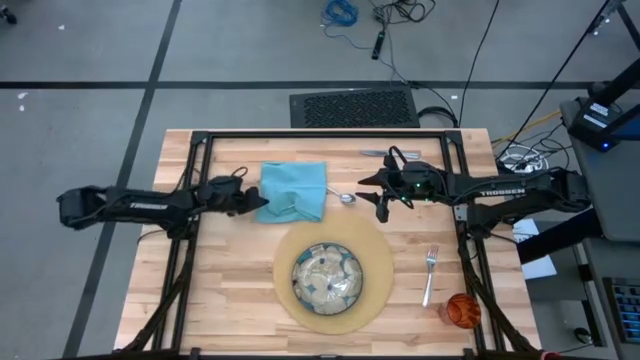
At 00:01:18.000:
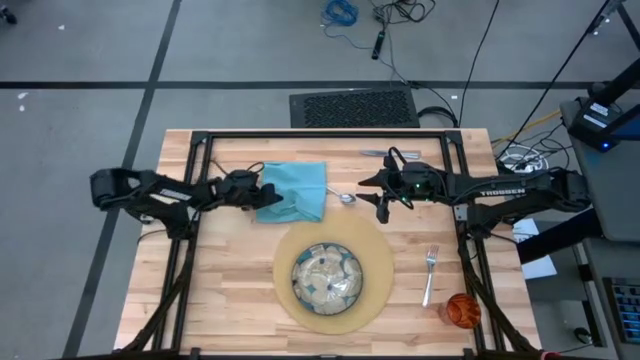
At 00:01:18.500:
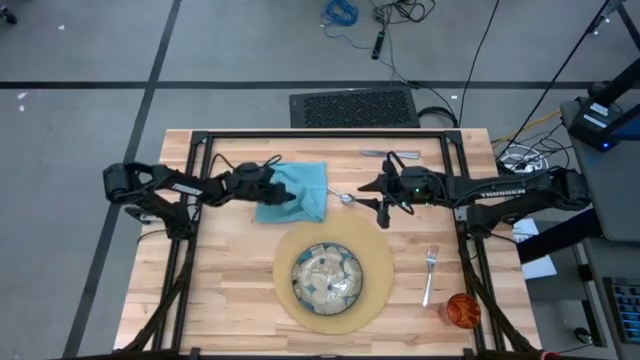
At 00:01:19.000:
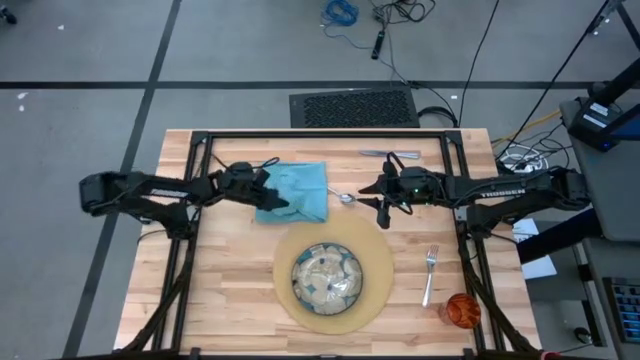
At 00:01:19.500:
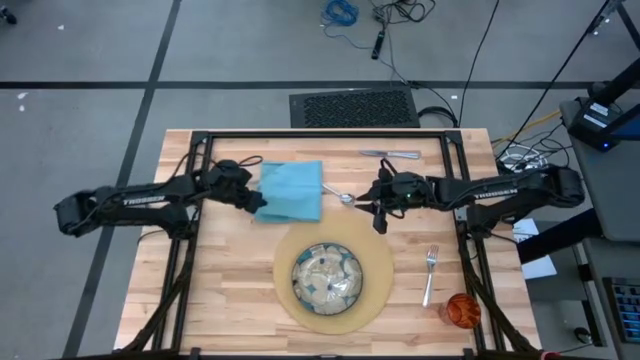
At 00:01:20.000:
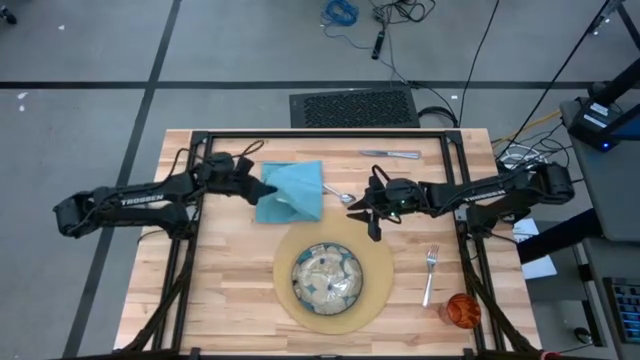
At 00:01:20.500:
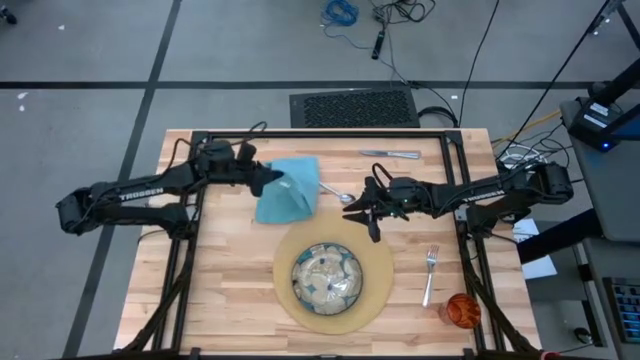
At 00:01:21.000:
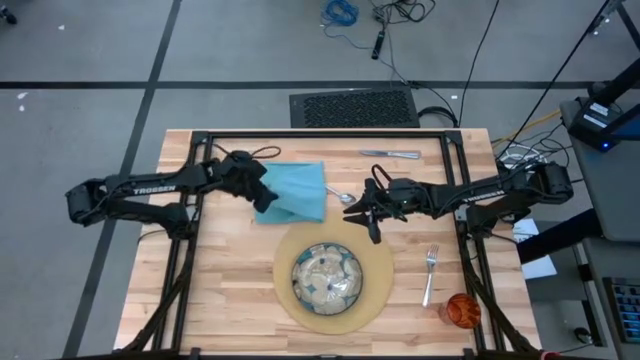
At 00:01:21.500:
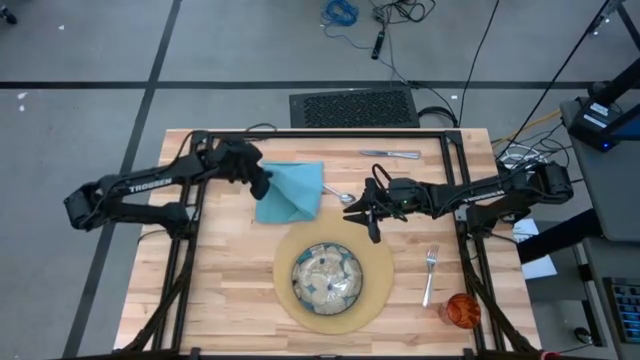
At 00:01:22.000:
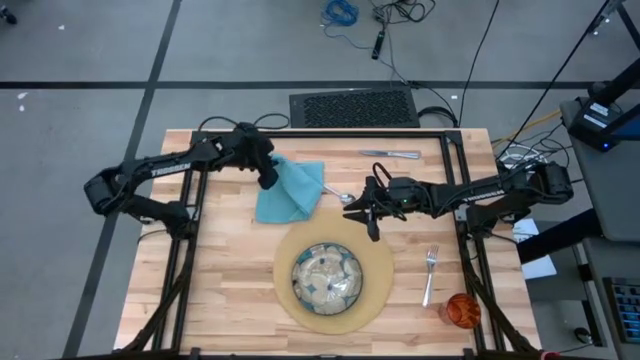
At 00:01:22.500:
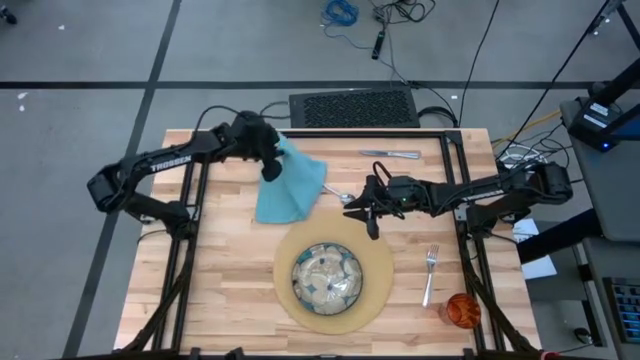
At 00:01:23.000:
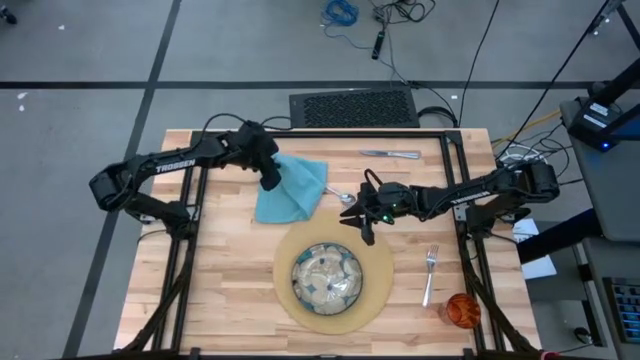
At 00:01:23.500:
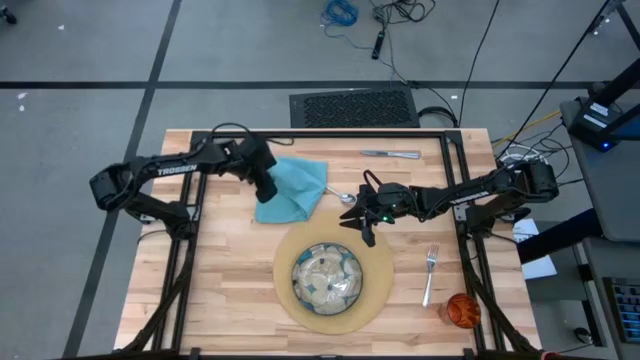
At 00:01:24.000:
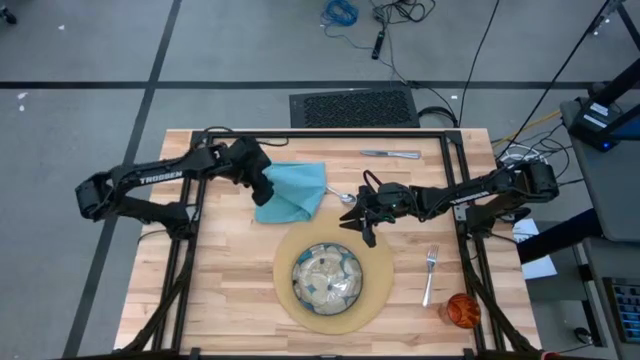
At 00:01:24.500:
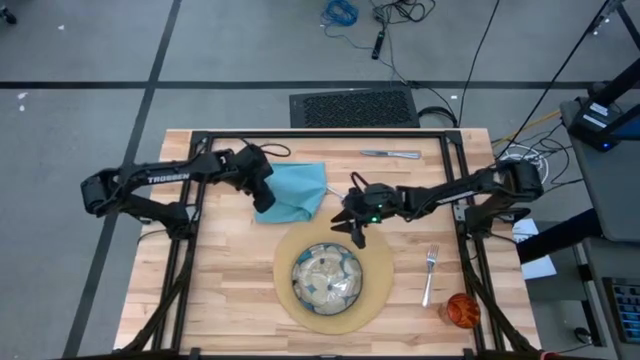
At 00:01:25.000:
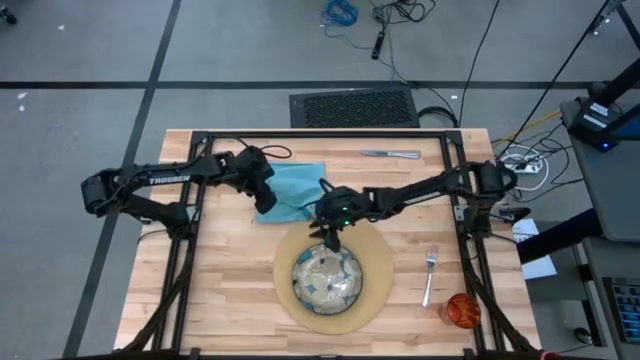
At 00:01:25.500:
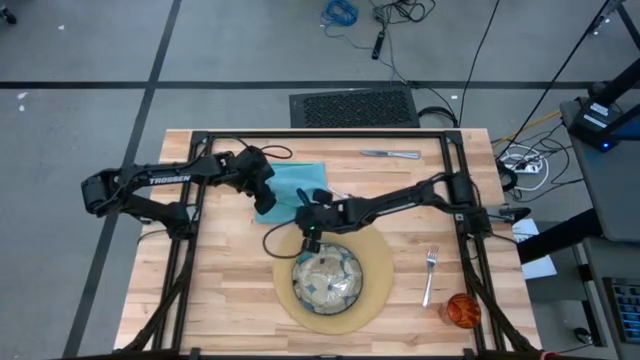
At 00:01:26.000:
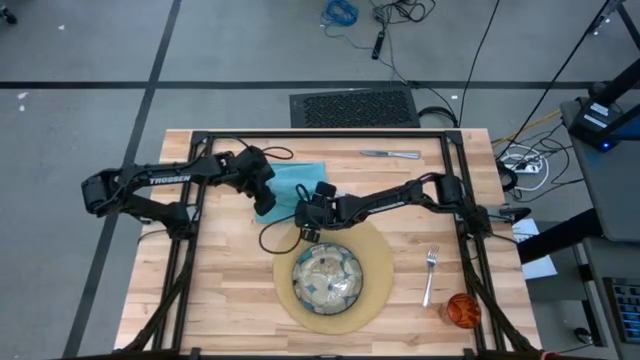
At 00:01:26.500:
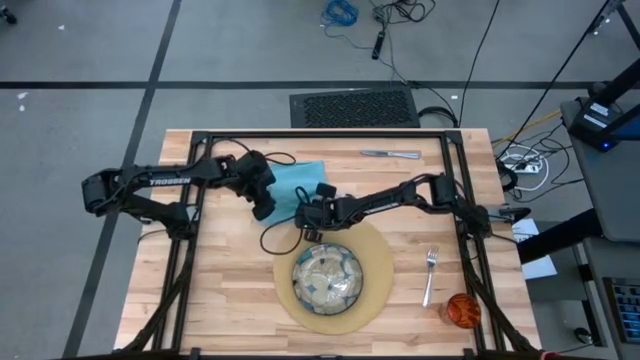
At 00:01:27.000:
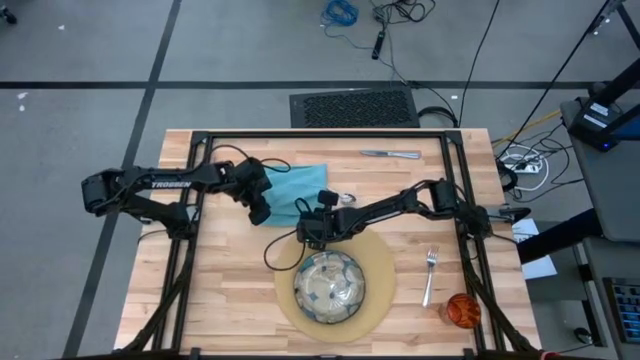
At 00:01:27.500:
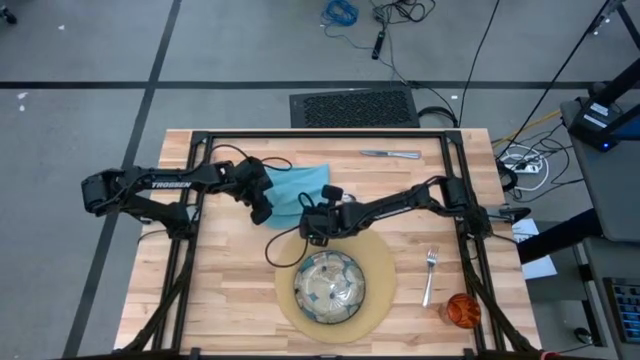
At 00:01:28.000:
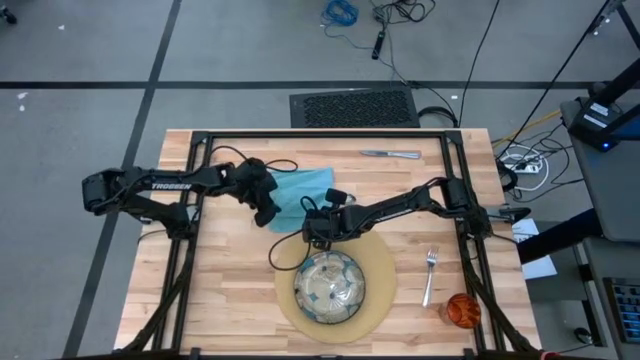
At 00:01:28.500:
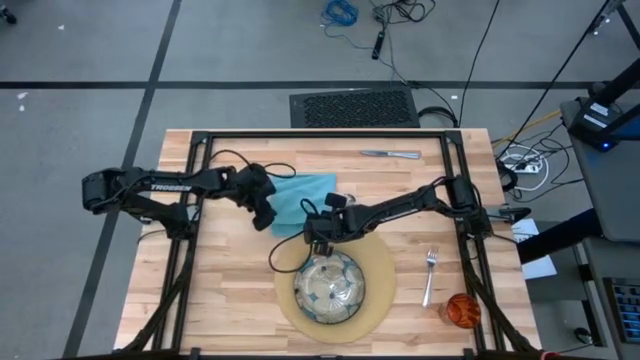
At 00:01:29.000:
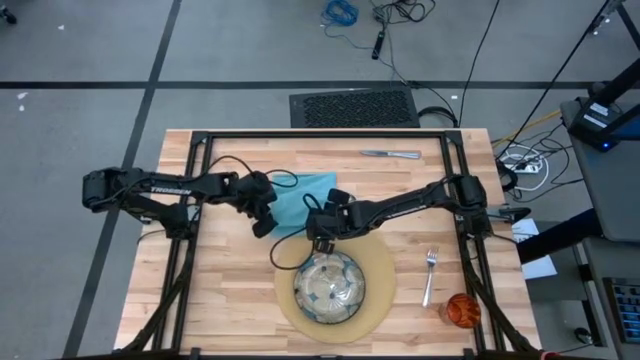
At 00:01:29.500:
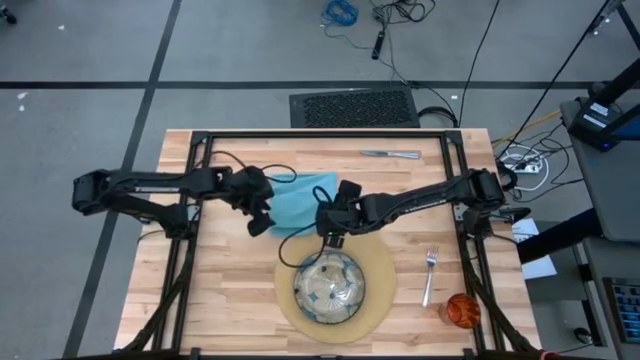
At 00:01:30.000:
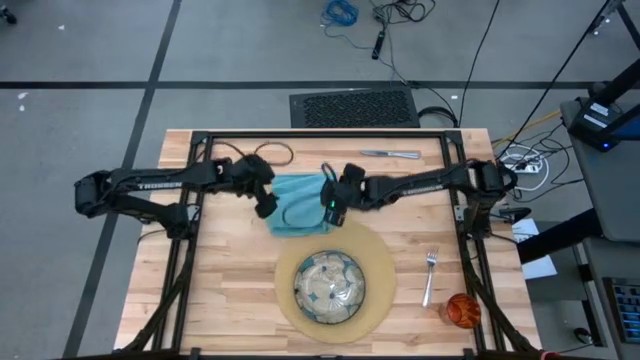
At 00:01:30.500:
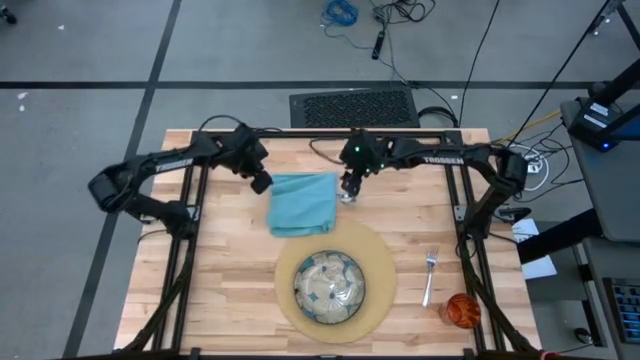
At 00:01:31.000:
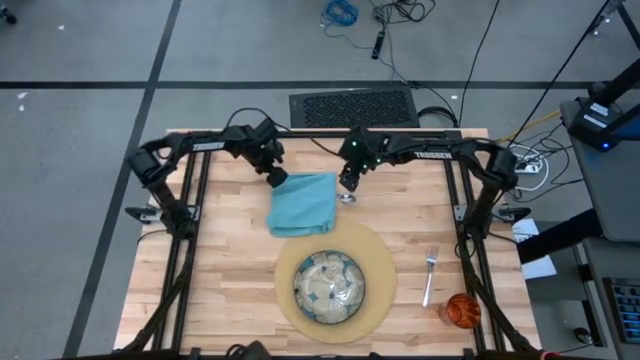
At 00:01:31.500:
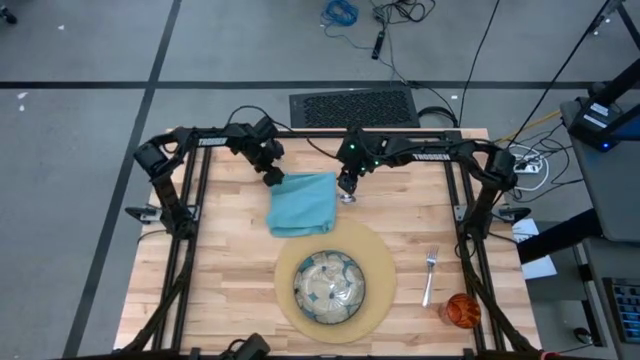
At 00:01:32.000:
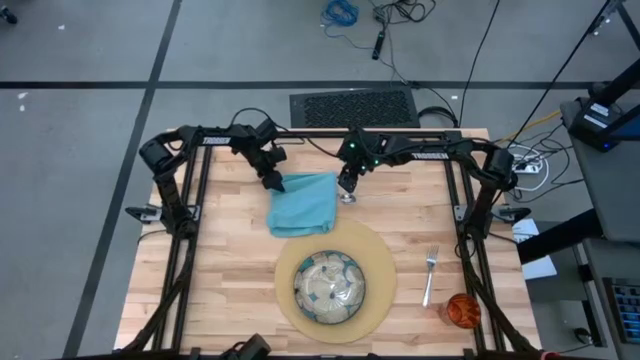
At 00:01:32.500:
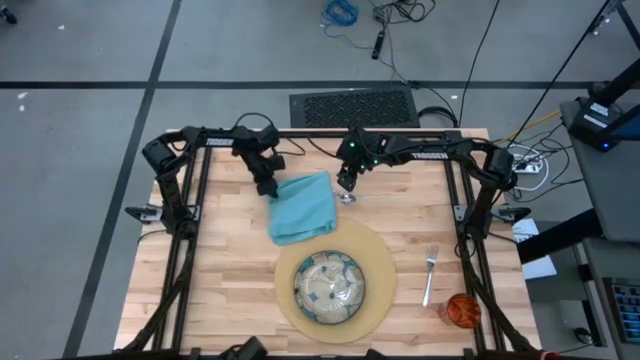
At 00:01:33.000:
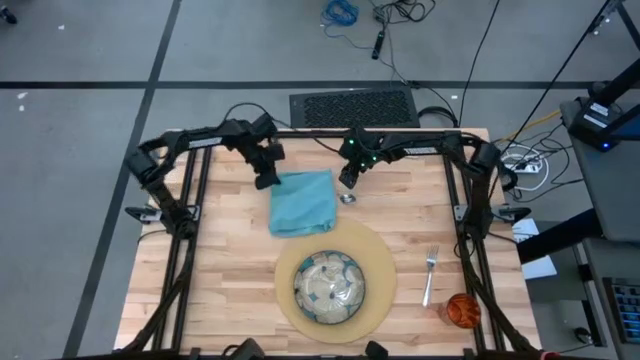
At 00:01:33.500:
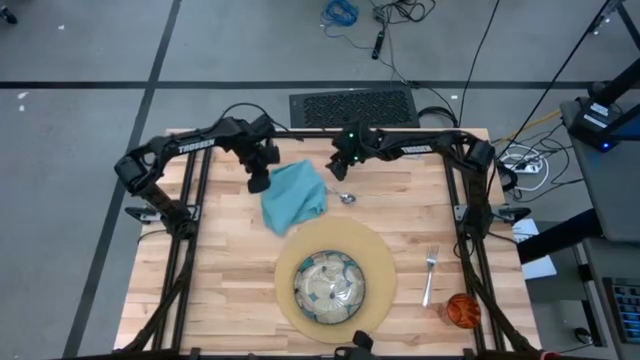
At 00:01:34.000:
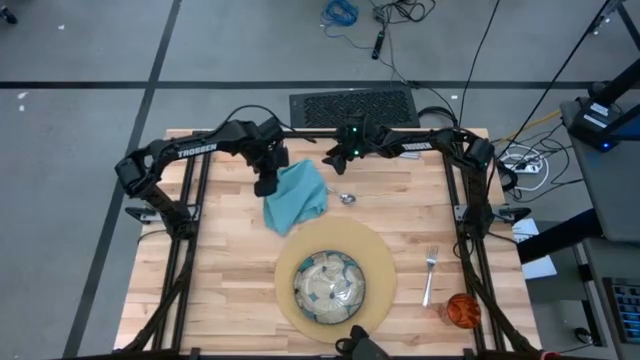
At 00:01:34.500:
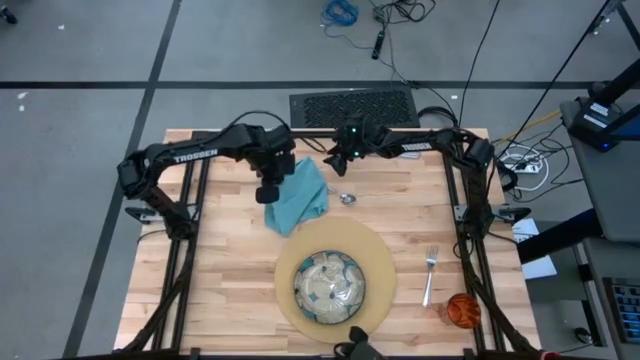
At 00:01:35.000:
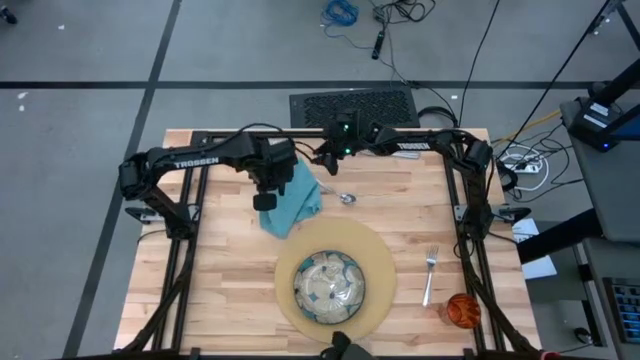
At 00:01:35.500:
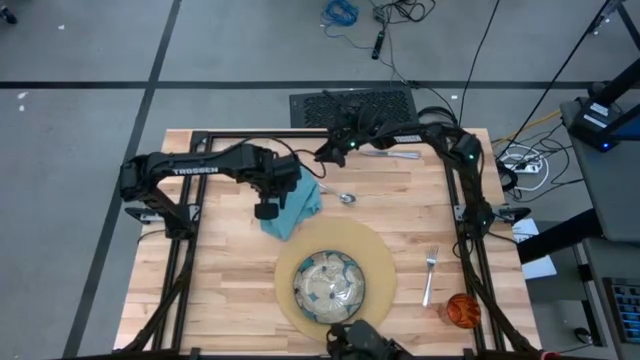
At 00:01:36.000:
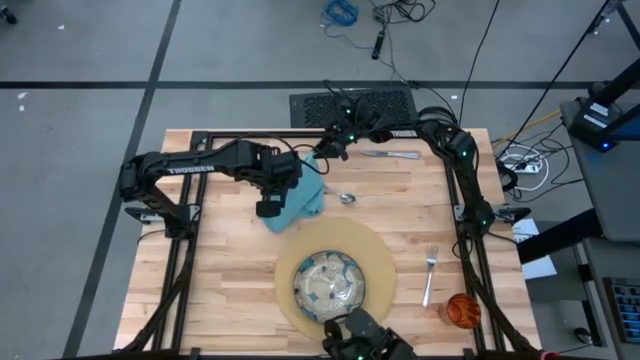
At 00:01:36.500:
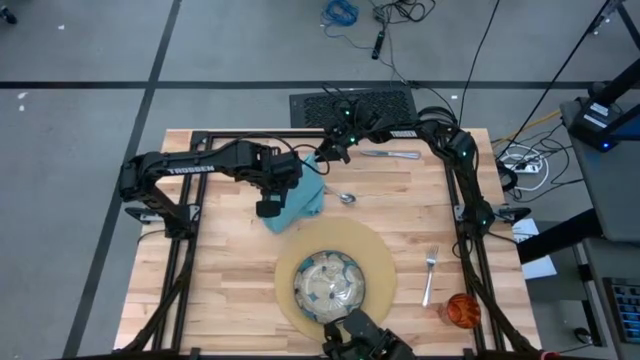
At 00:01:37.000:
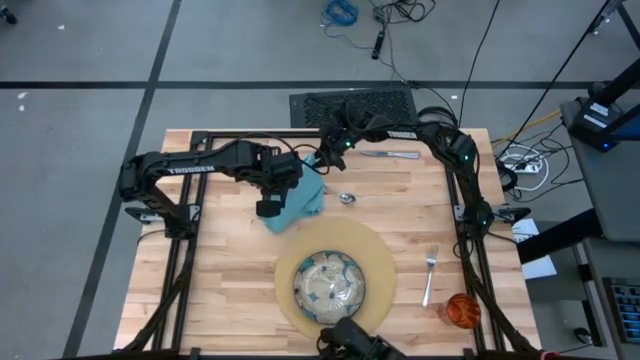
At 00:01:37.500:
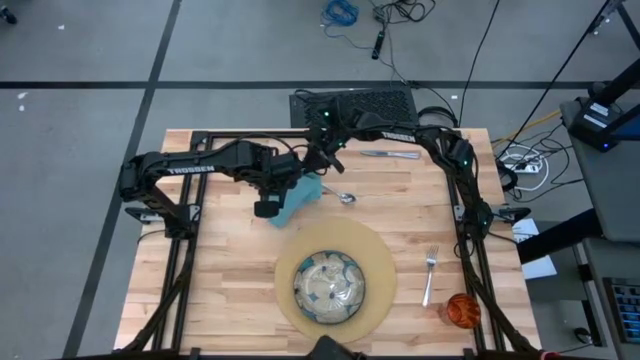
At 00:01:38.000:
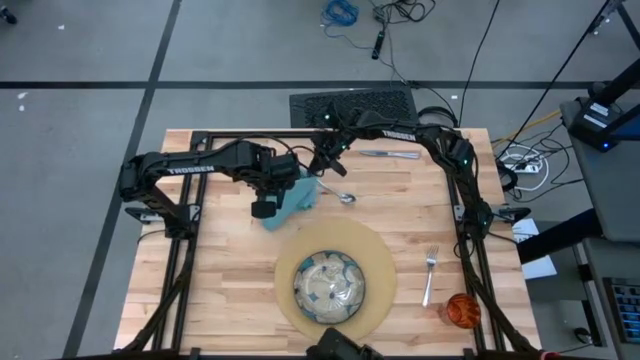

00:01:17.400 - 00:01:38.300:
Task: Set table place
Fold the blue napkin
